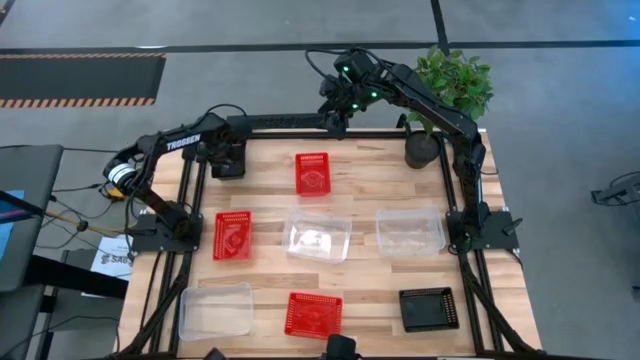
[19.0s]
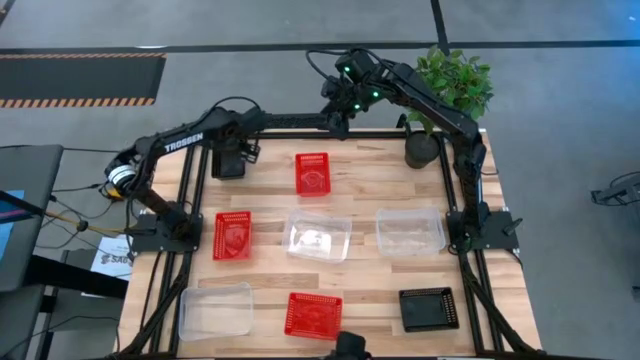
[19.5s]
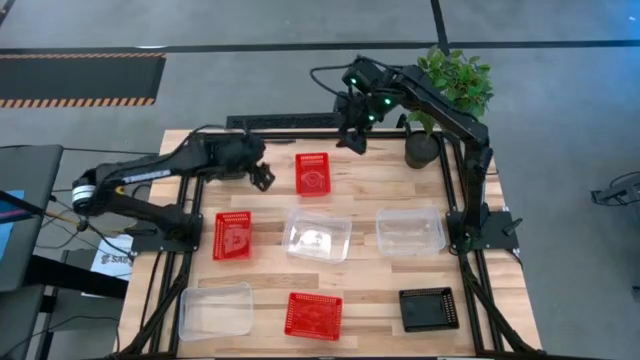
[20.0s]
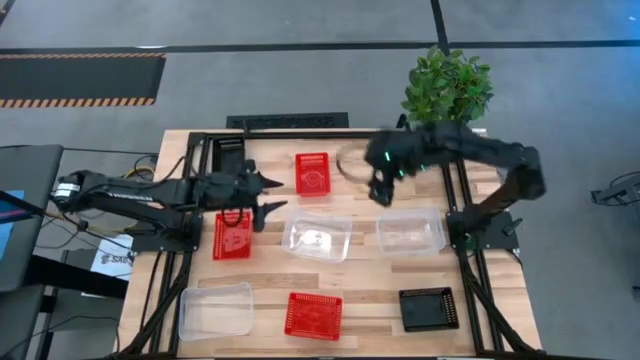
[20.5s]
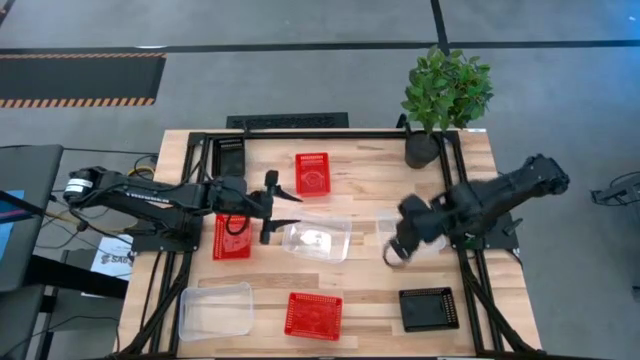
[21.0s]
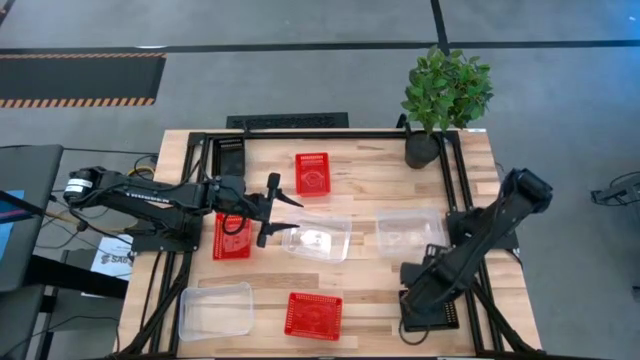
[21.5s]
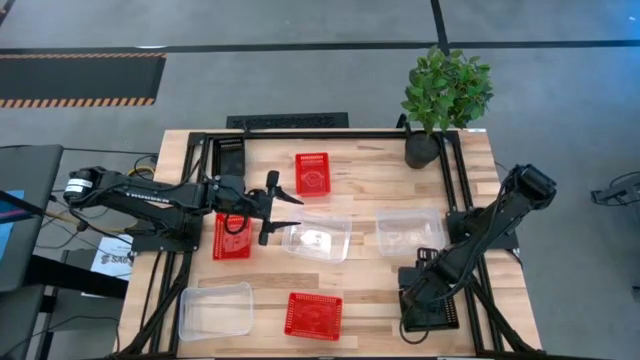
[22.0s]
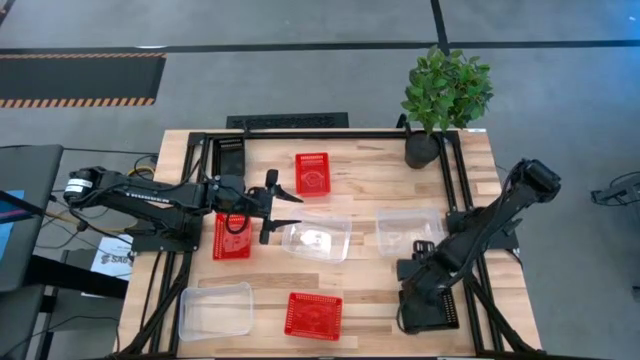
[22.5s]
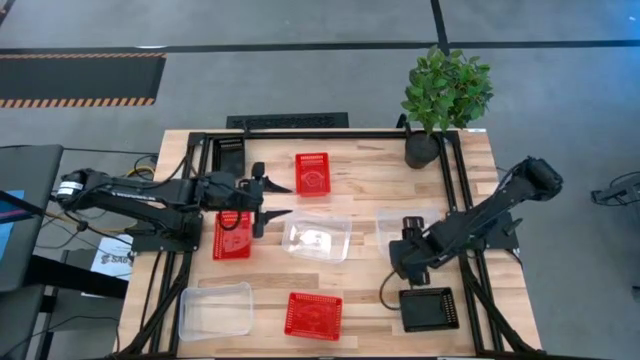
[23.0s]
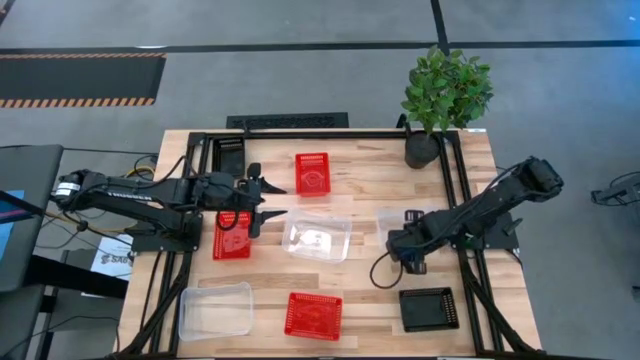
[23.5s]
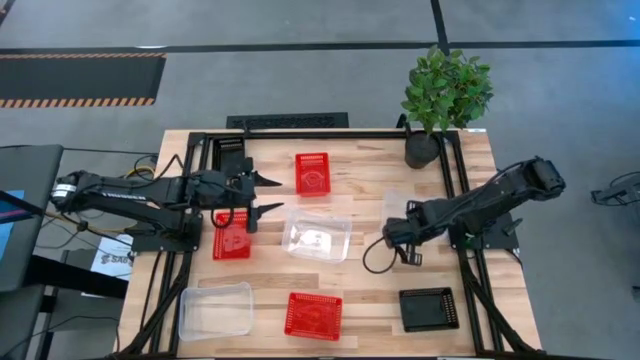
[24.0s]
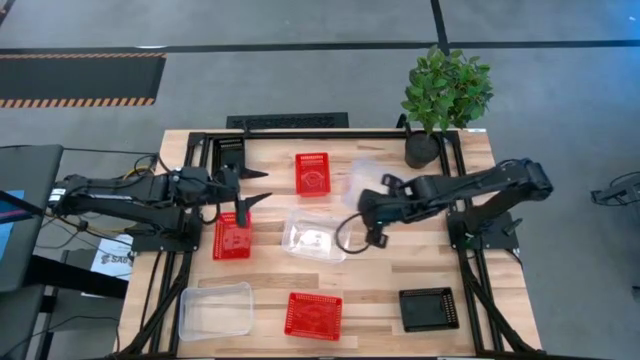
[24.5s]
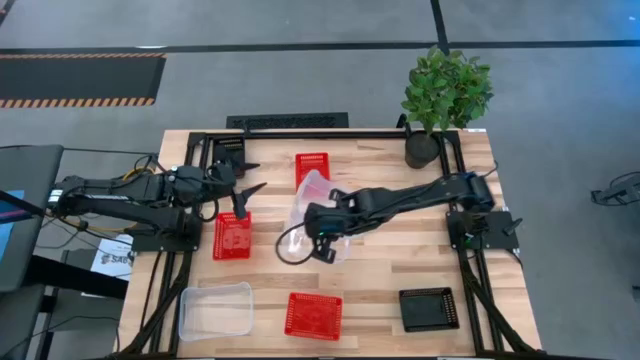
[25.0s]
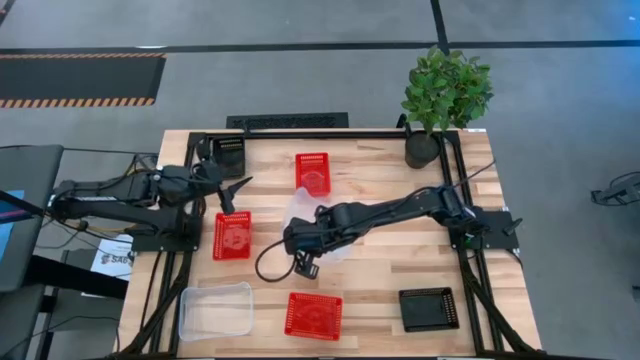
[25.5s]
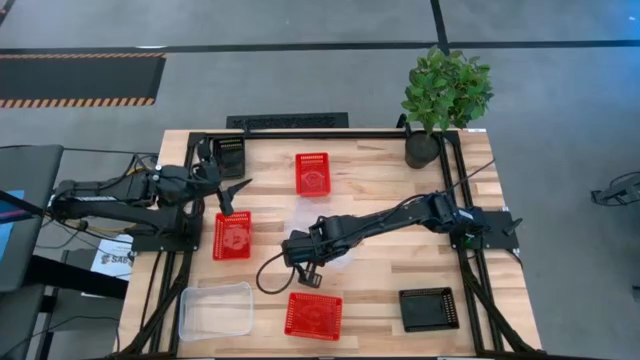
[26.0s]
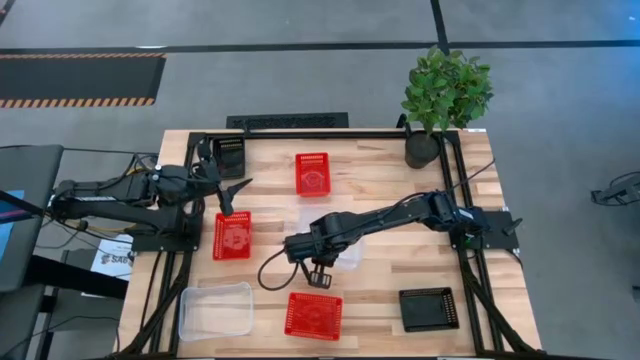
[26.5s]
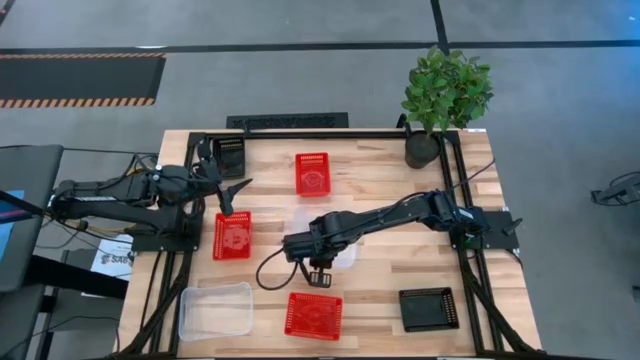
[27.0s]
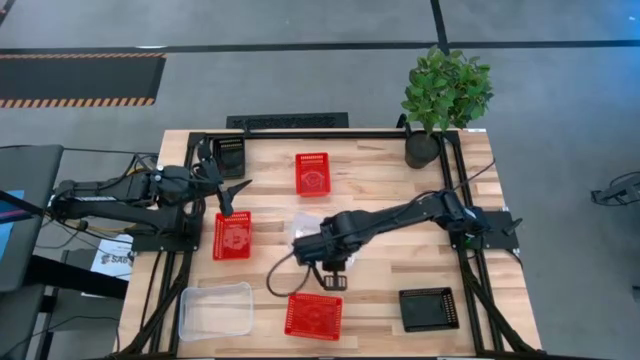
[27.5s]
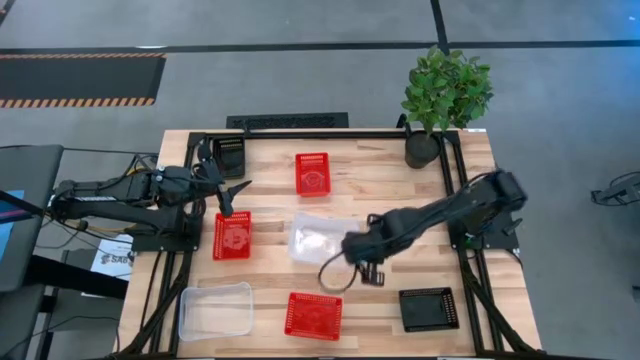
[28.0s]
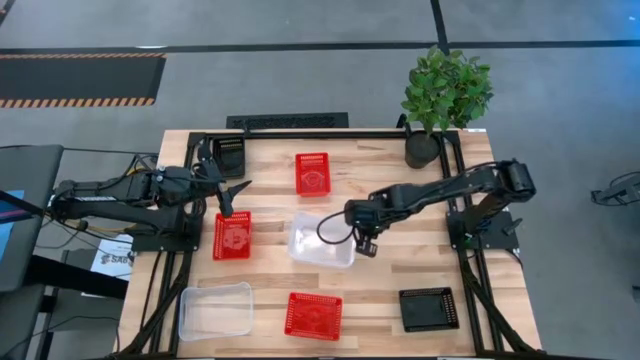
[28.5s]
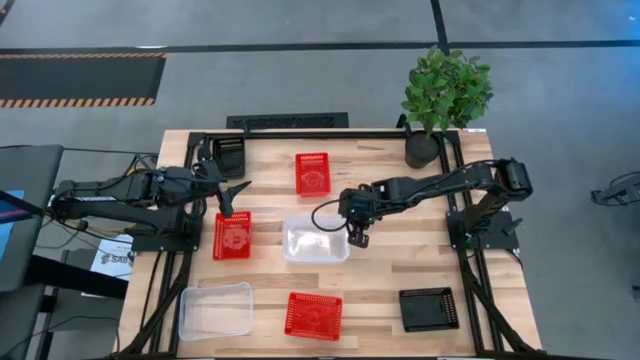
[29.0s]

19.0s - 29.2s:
Stack the top right transparent bin on top of the top left transparent bin

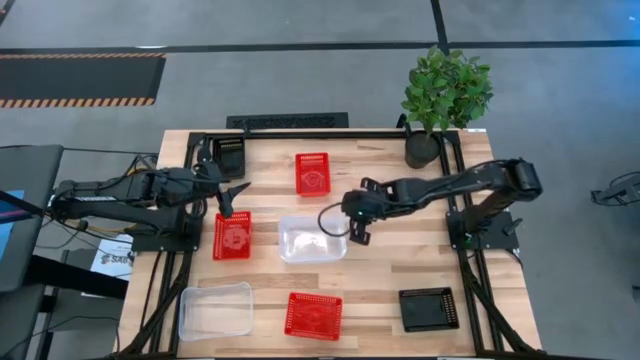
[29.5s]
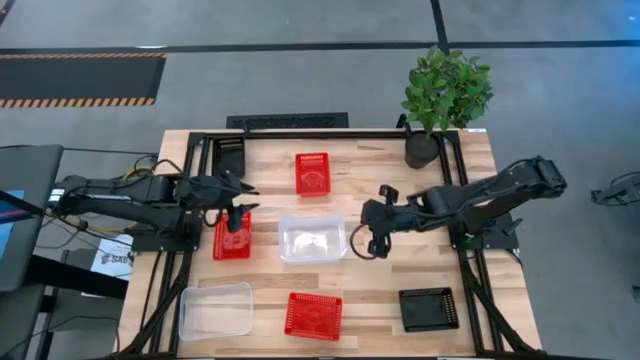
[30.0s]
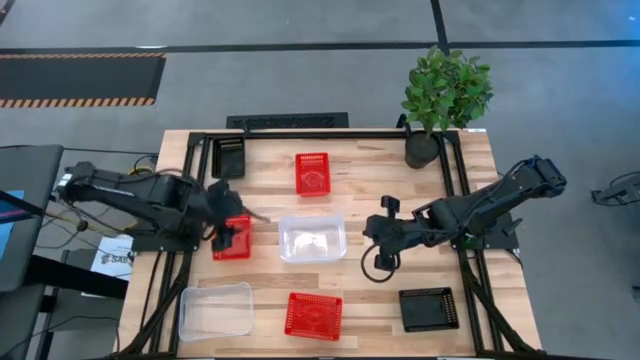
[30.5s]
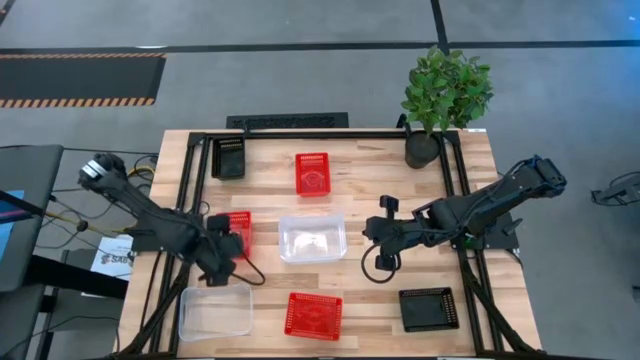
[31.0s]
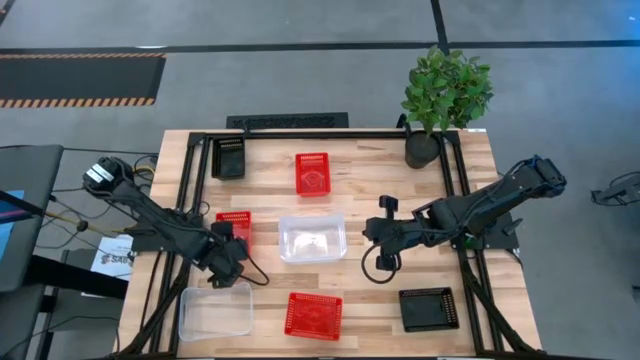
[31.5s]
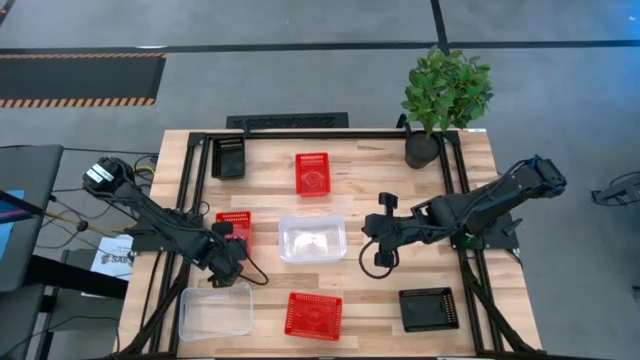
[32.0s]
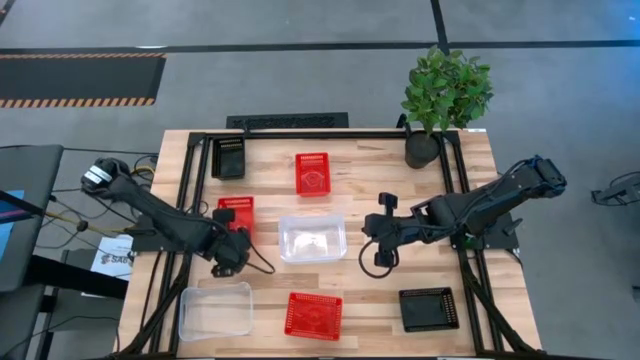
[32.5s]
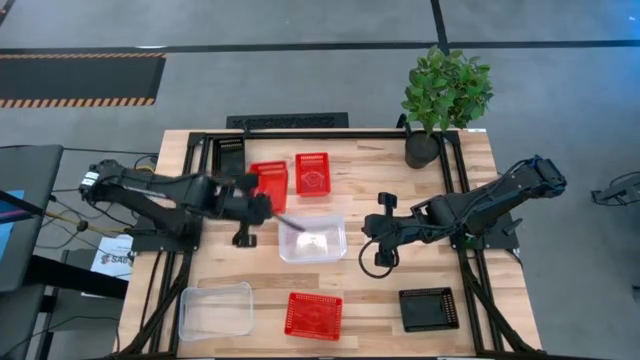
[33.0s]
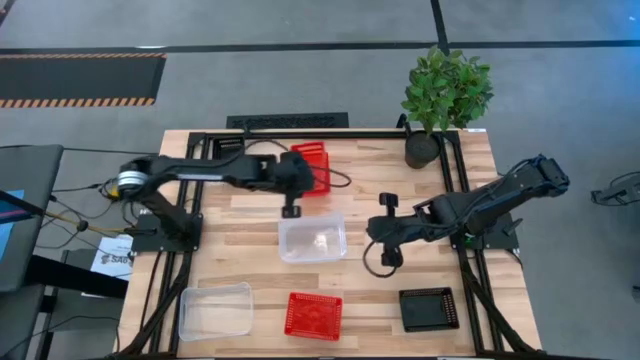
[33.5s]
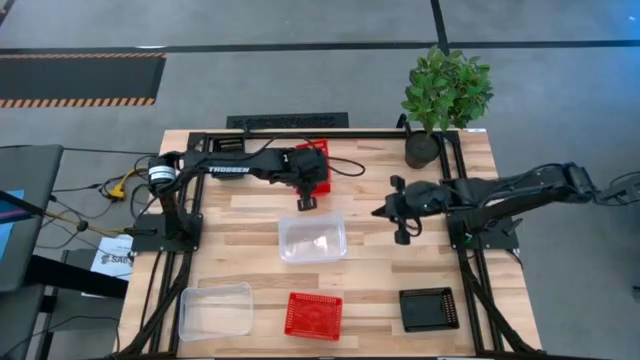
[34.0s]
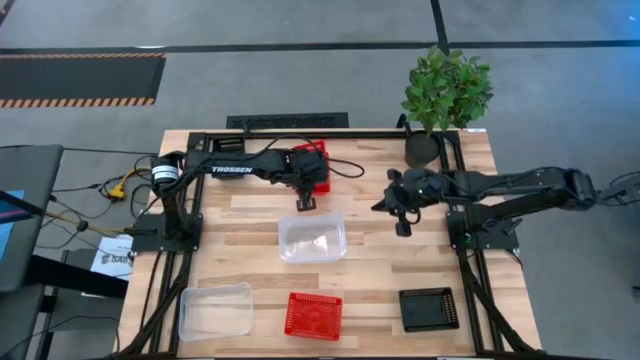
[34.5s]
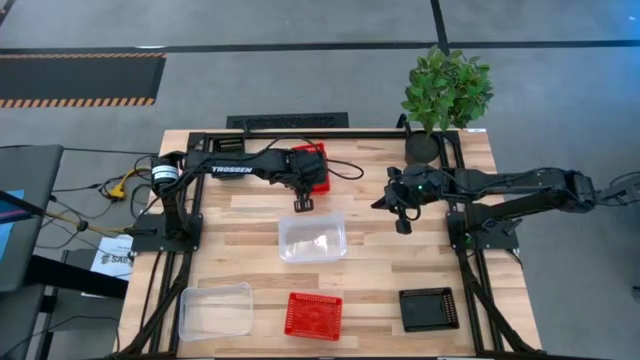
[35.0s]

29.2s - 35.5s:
Stack the middle left red bin on top of the top red bin
